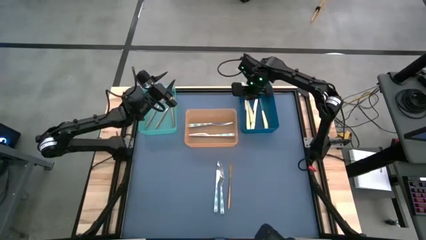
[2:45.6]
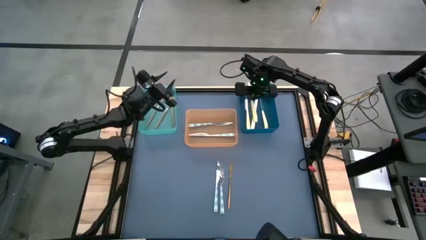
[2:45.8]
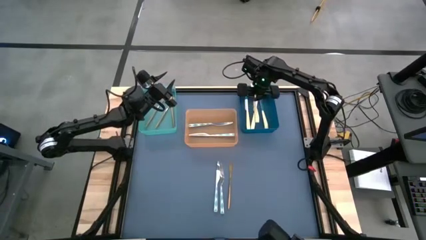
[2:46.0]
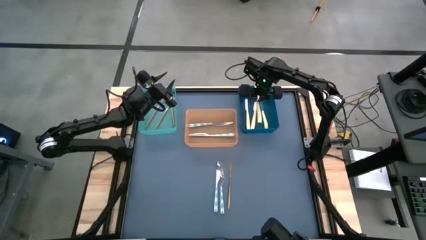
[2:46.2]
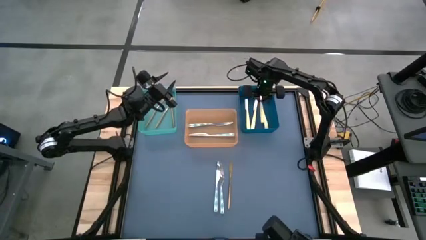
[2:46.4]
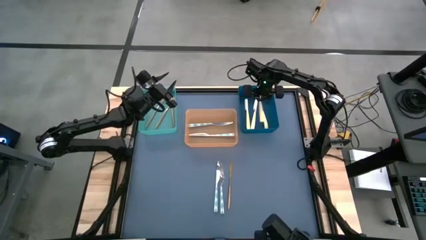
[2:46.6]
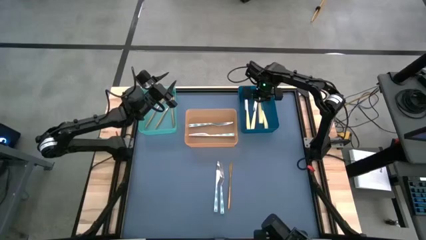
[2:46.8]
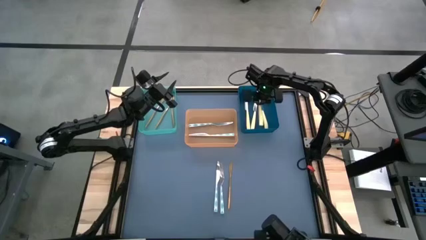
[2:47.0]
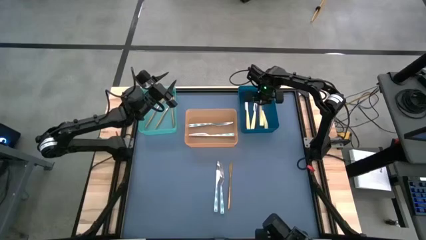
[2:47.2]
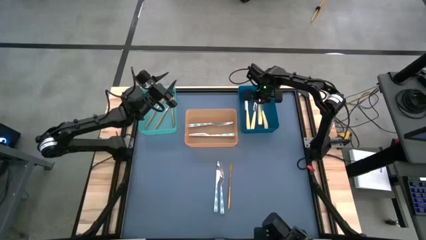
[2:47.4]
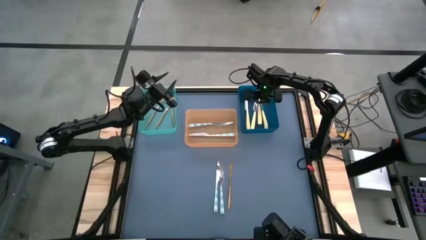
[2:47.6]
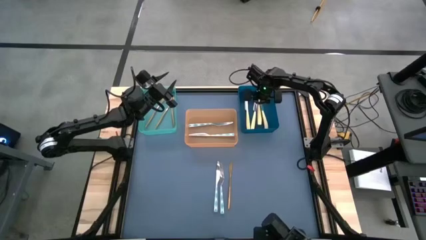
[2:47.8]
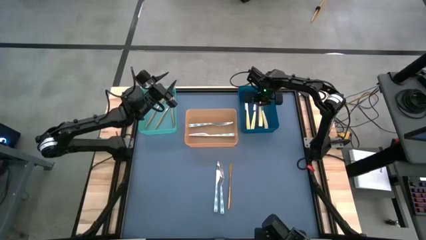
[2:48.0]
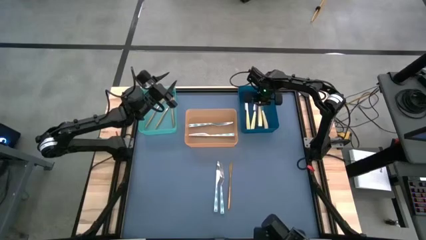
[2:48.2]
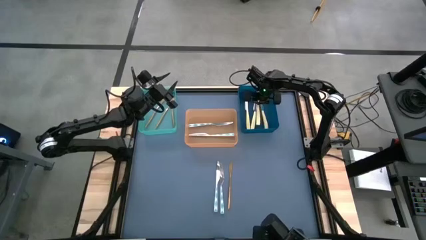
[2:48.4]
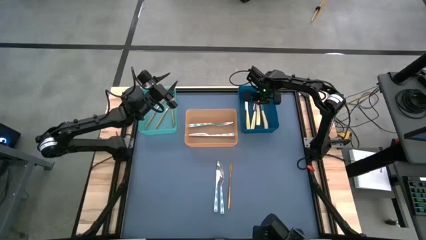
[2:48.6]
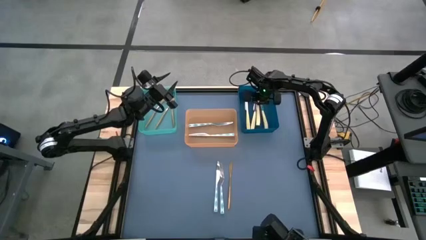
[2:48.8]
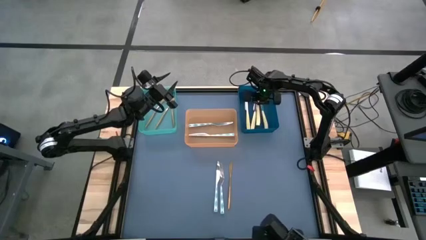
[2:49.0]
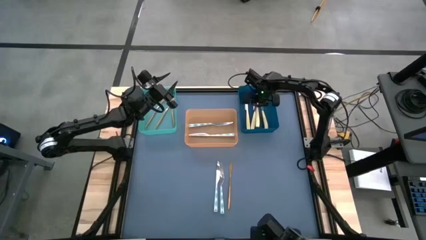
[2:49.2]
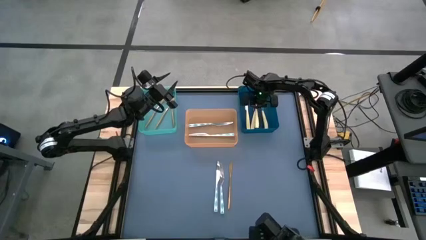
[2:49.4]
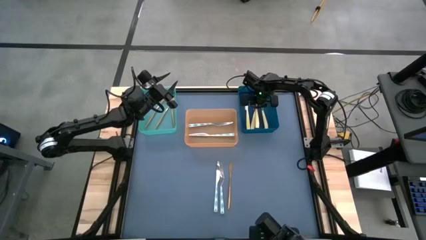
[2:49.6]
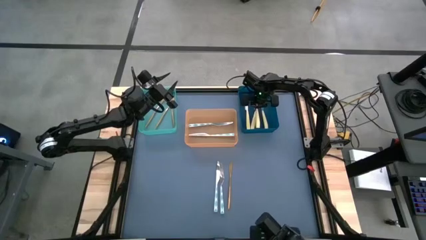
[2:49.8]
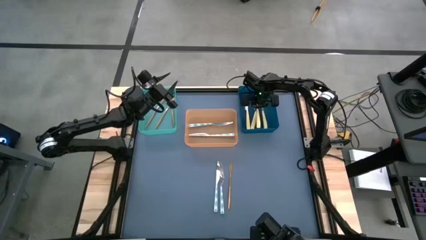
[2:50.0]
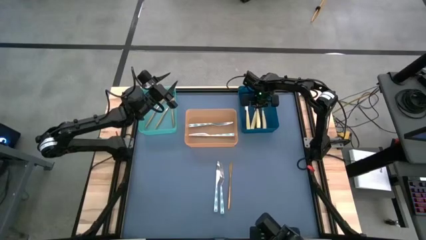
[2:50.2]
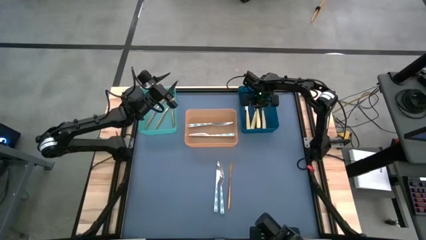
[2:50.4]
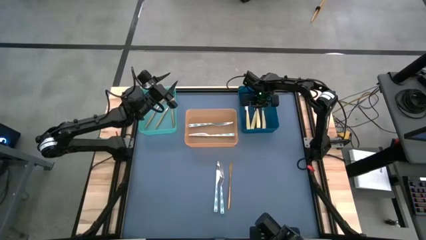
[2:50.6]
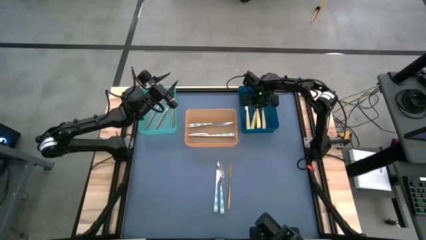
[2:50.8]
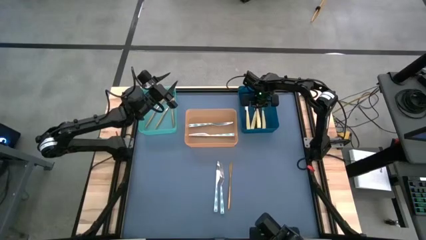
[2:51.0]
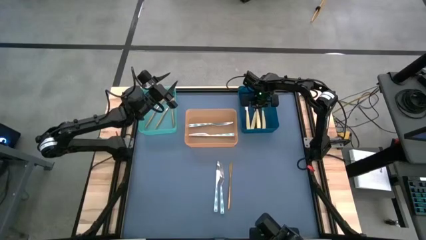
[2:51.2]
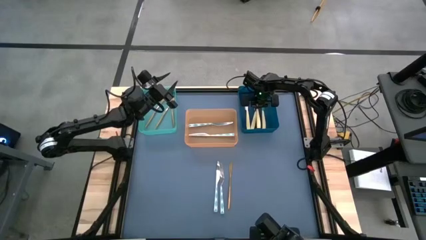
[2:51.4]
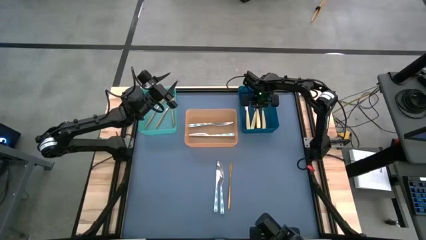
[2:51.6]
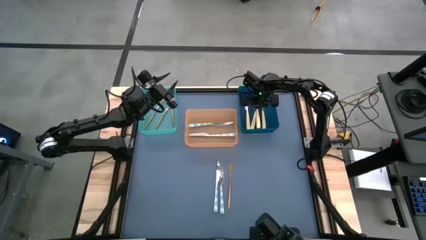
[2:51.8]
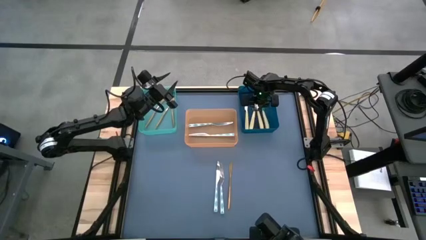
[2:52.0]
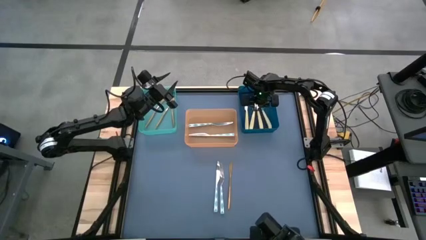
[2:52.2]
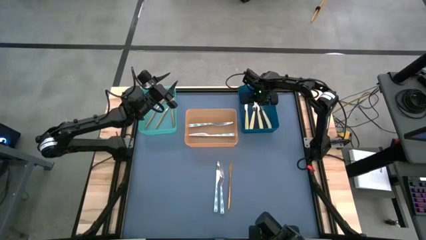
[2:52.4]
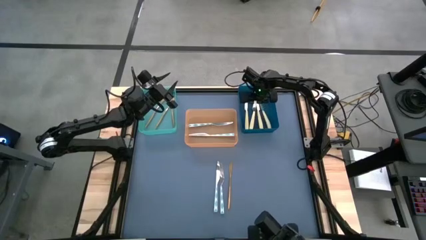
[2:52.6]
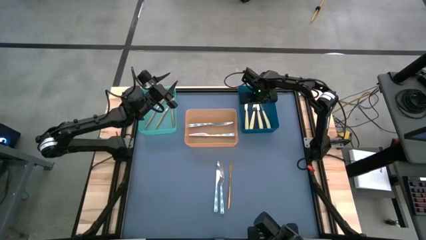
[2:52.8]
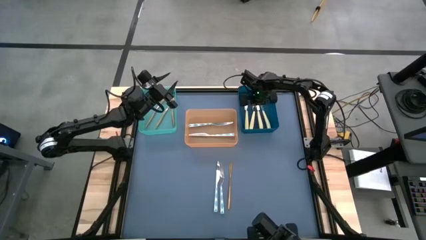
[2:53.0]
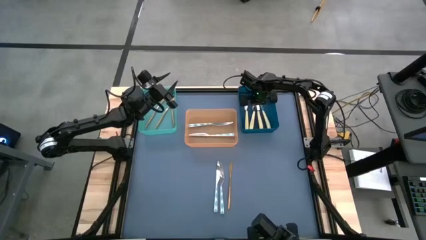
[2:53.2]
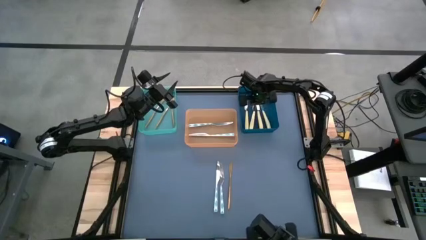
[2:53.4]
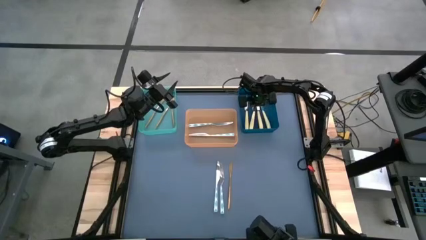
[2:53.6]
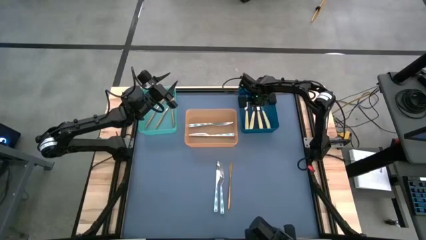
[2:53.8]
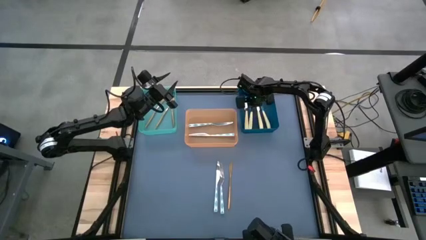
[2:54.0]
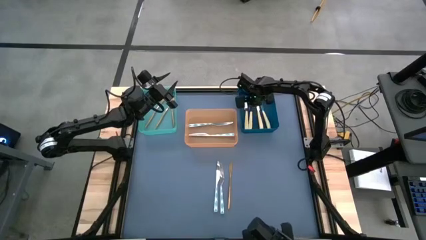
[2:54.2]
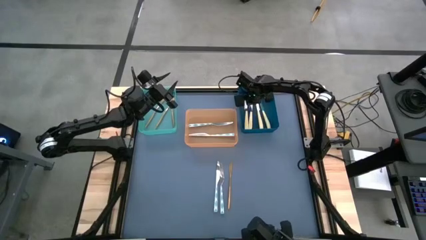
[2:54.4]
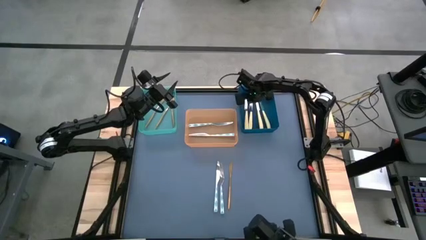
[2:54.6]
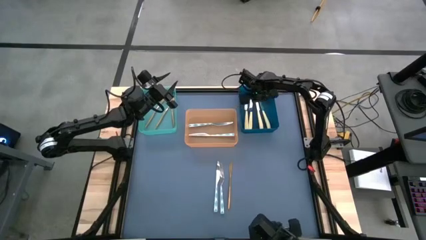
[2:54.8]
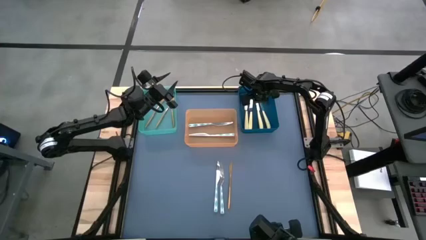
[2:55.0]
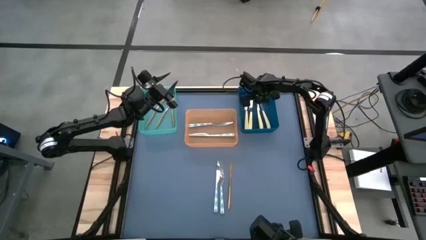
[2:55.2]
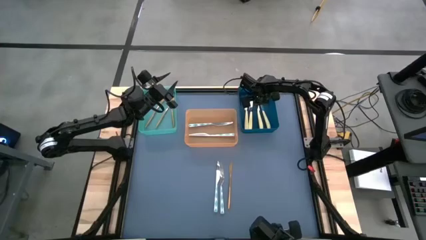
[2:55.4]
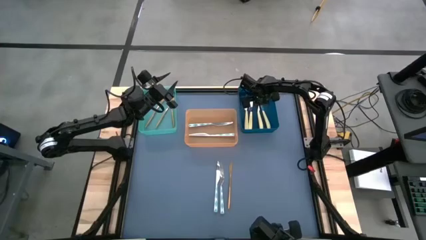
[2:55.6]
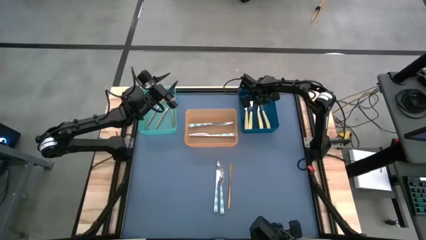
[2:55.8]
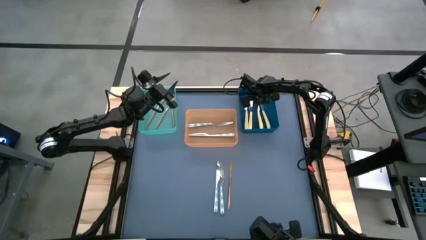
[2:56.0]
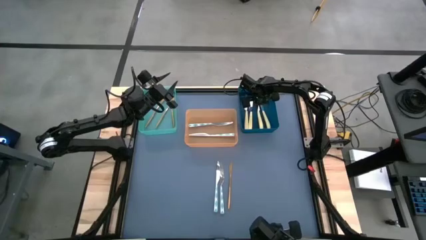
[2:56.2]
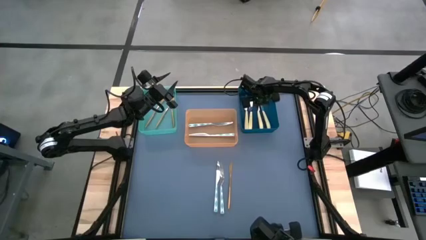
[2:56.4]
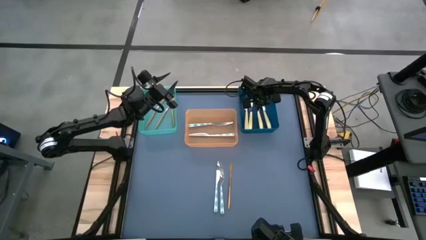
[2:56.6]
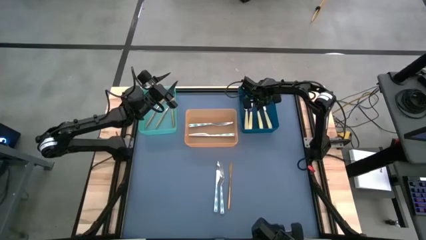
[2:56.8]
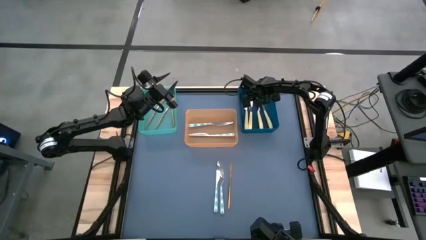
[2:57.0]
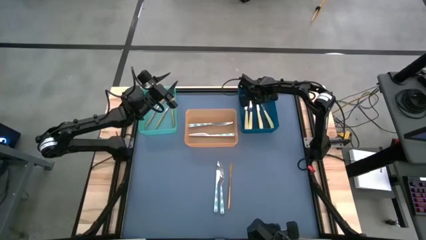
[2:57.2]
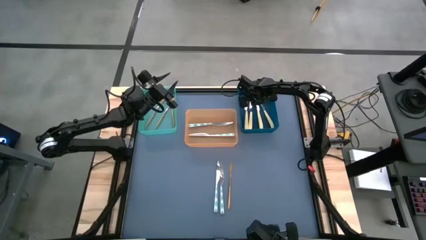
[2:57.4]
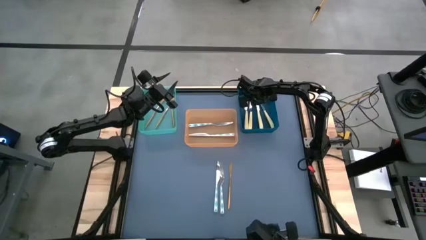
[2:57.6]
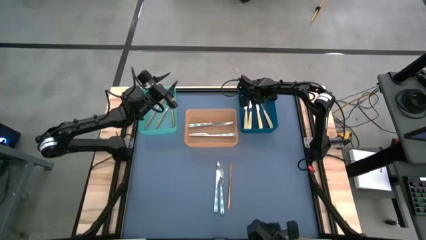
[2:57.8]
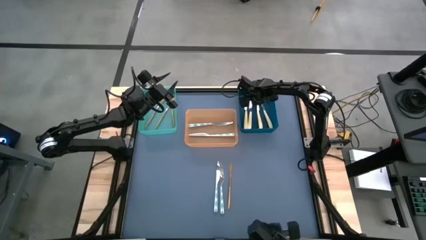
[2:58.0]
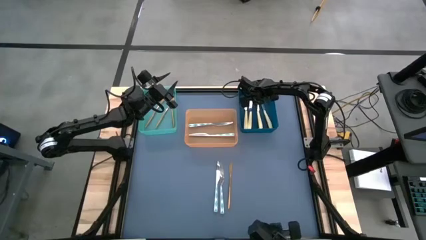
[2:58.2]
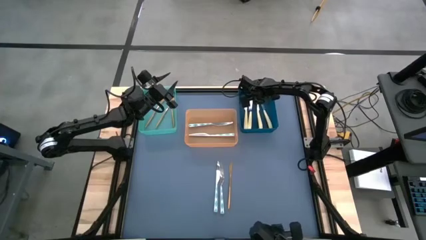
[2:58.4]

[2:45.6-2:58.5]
Task: Sort silverware by color (type)
Put the yellow knife into the blue bin

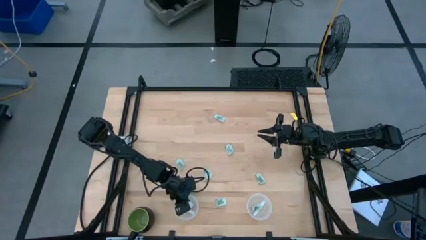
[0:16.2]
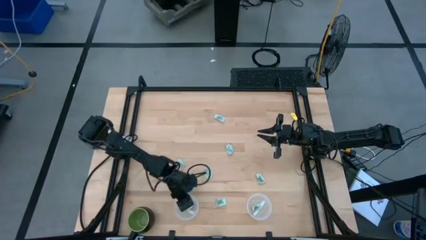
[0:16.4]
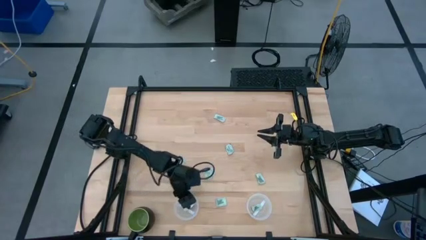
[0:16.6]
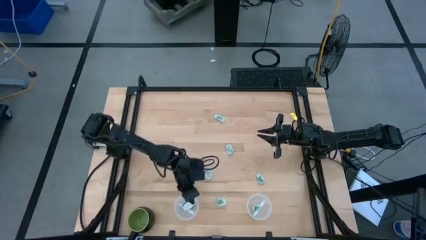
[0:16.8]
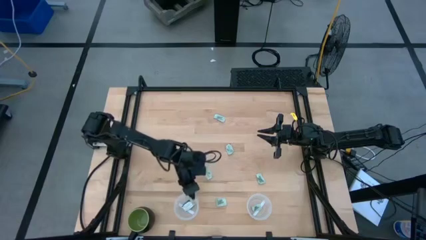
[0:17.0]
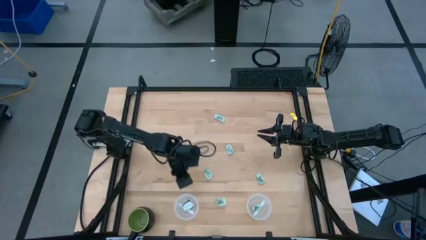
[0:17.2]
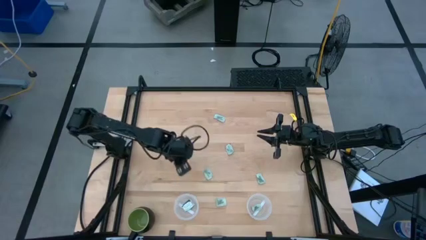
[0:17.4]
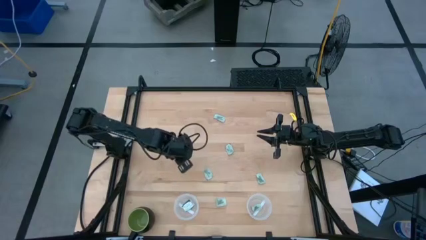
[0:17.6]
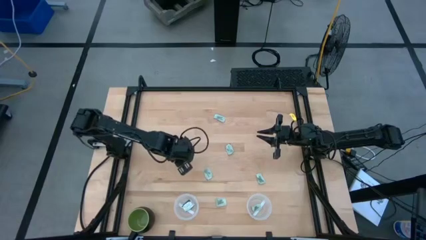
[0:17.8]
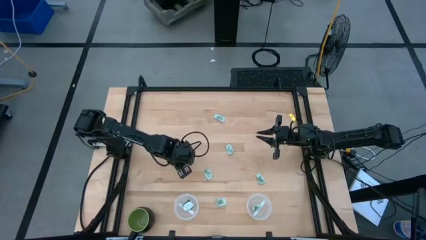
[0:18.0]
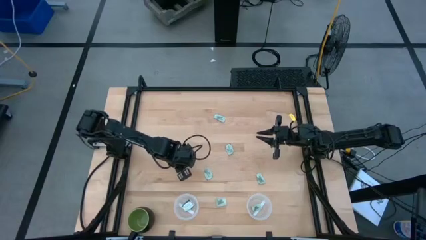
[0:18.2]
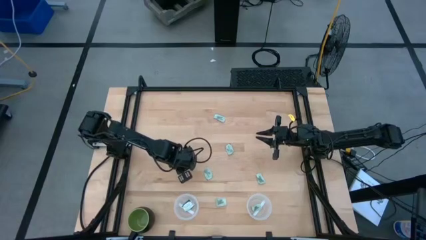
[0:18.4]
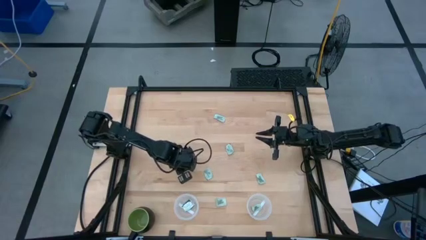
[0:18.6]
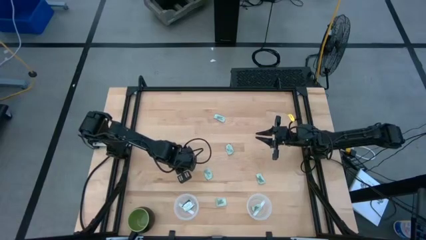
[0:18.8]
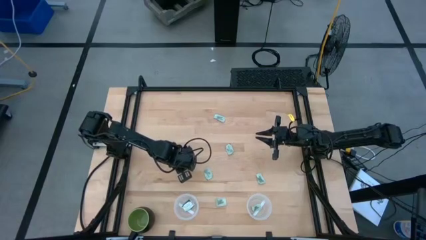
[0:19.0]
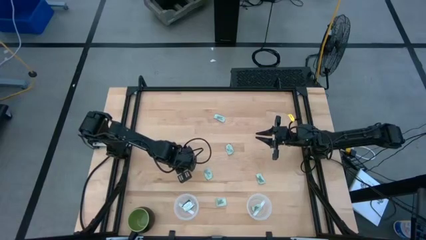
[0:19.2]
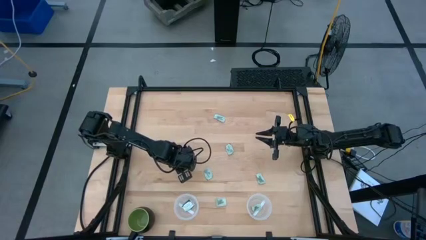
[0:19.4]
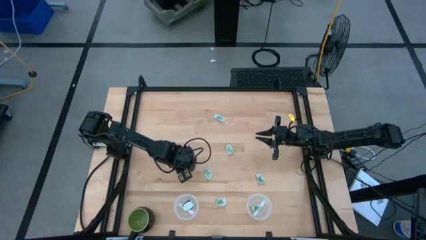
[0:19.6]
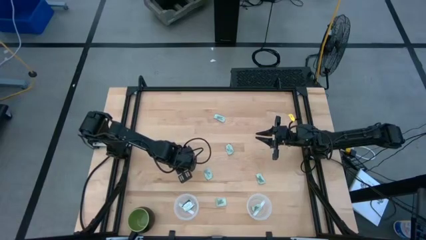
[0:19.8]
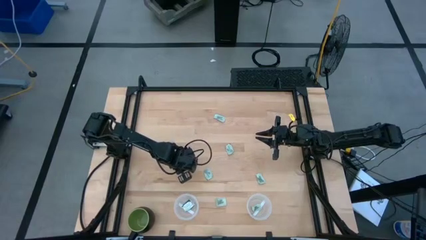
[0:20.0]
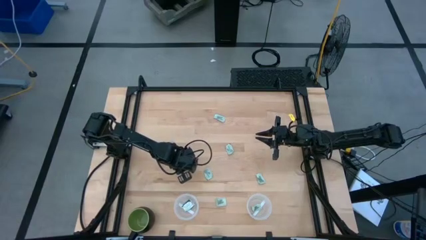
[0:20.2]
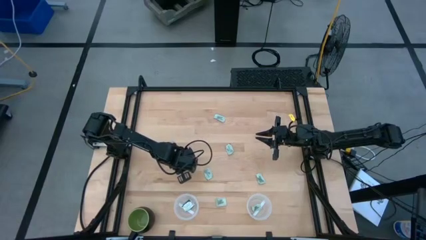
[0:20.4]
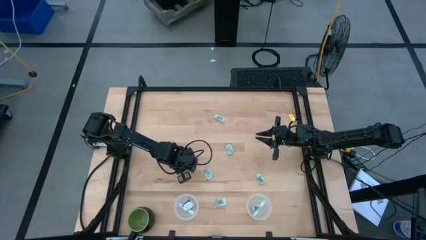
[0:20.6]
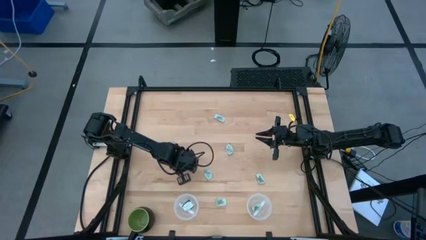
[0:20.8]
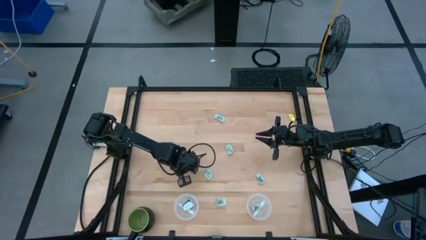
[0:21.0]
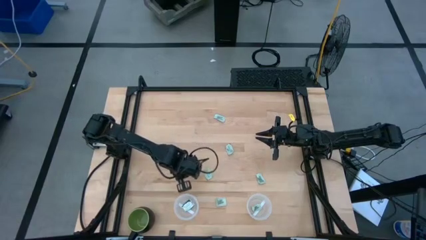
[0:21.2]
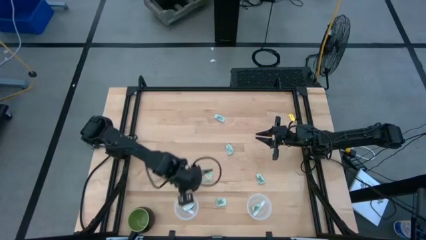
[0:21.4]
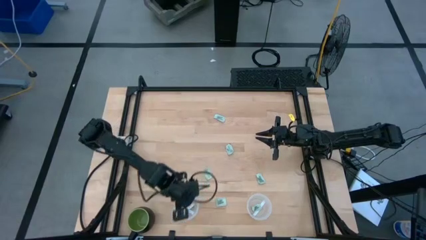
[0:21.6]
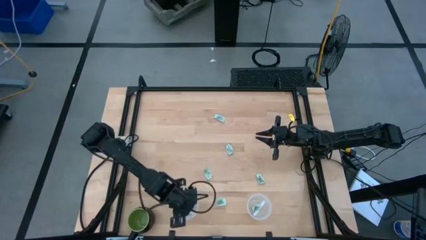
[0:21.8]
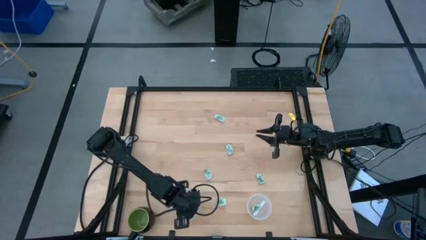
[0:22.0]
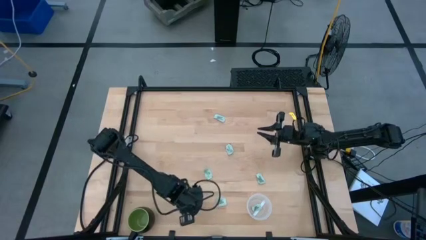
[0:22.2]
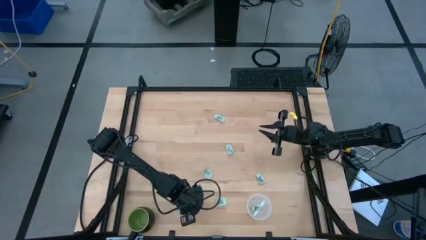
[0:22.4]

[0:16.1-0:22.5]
Task: Pick and place Stevia / Truvia into bins
Put the stevia packet into the left transparent container
